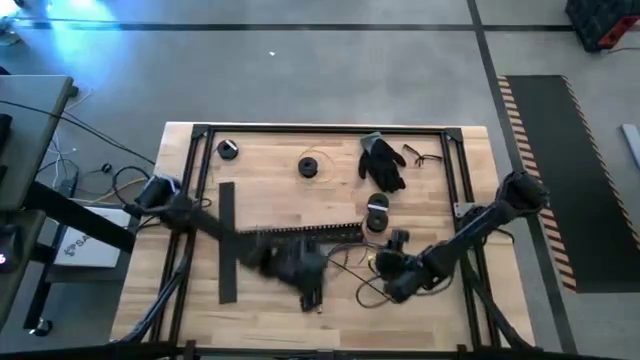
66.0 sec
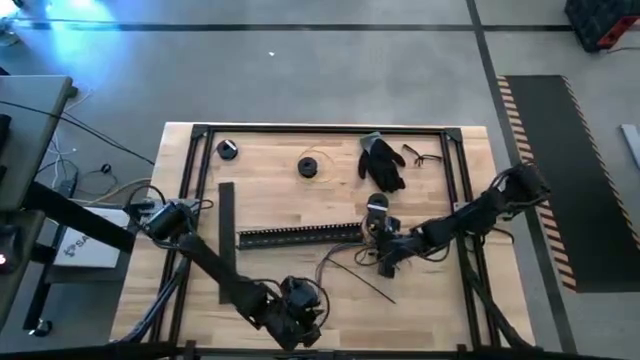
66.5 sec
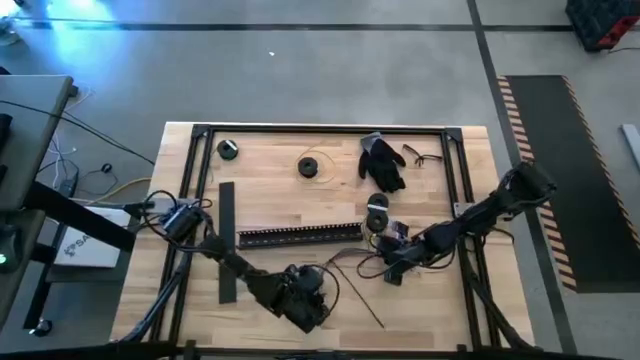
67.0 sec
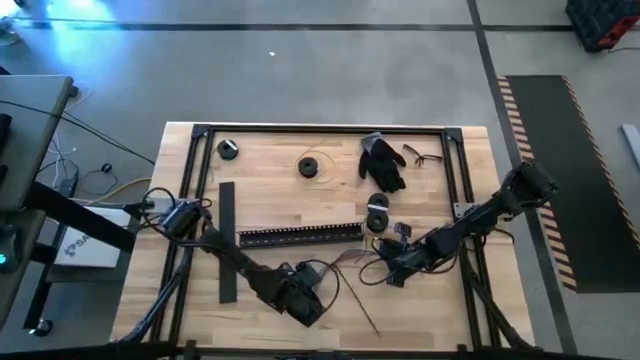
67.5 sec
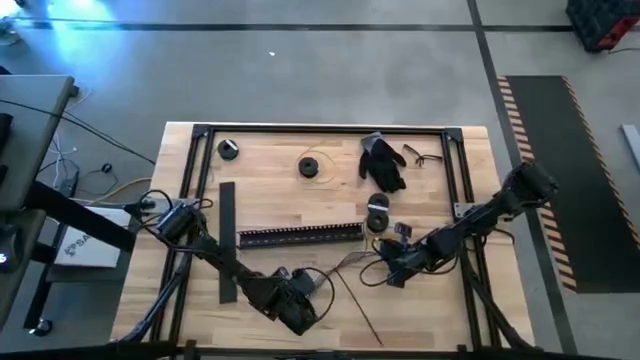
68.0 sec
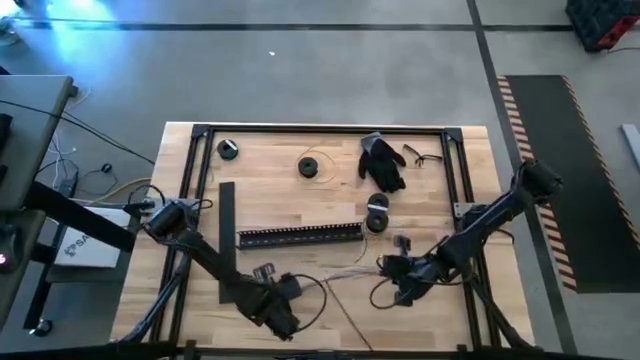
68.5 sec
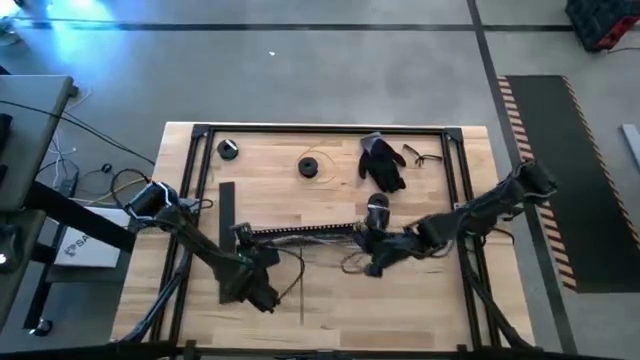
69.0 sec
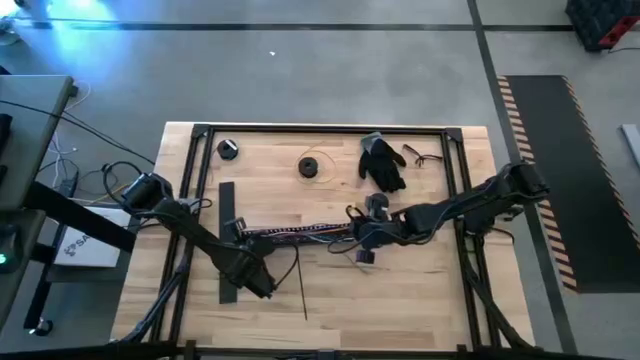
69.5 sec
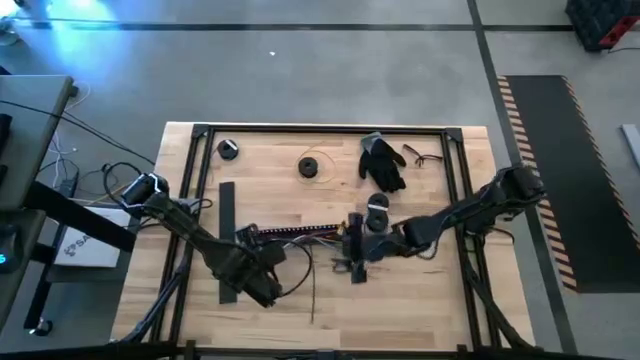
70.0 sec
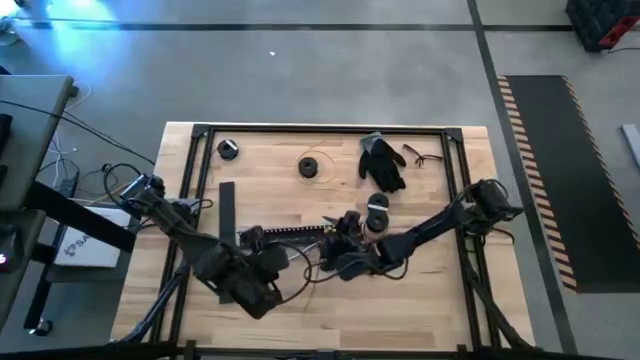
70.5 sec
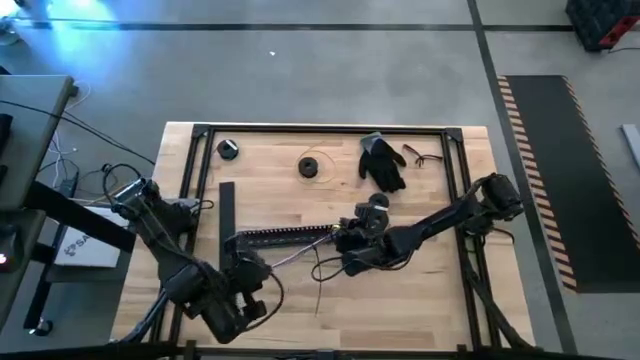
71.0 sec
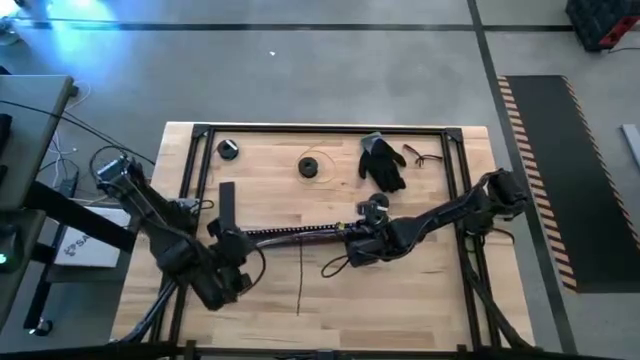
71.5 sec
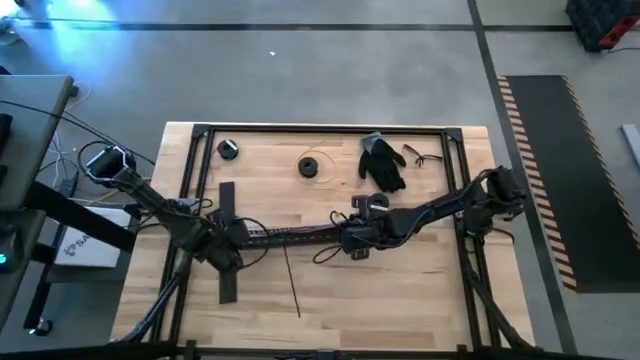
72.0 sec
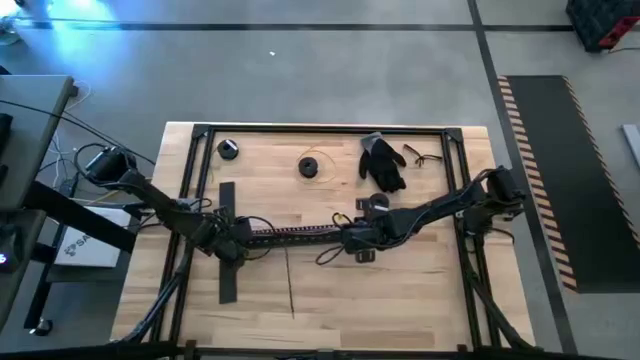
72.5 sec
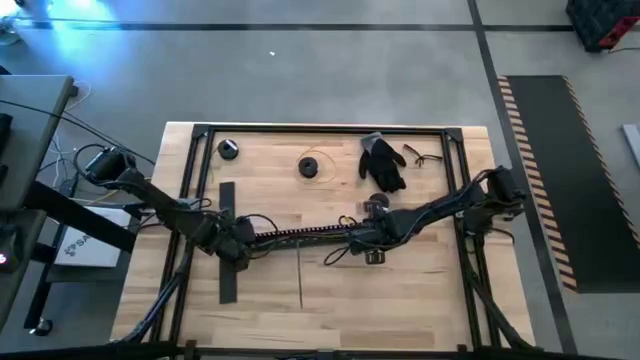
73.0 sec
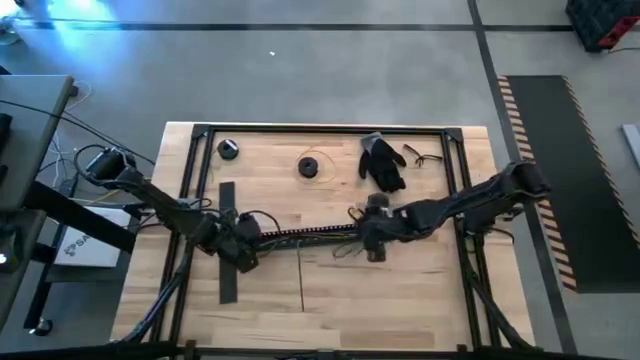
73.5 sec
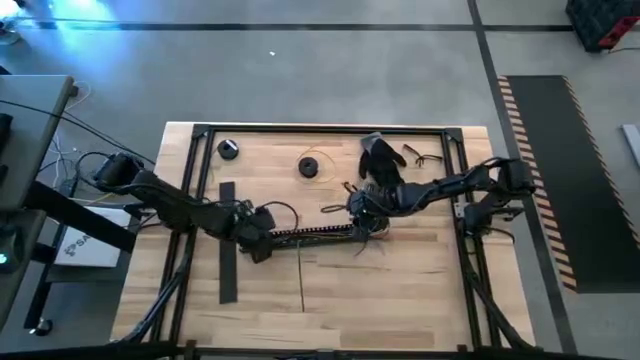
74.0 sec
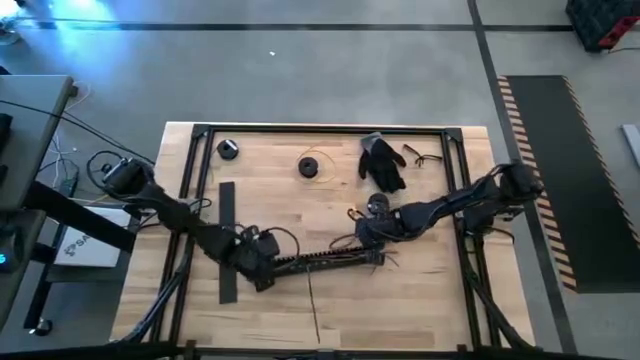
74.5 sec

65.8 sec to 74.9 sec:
Task: Ziptie cables
Put the black zip tie cable into the black cable duct

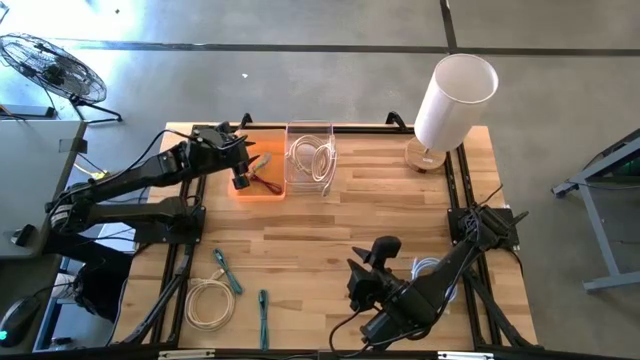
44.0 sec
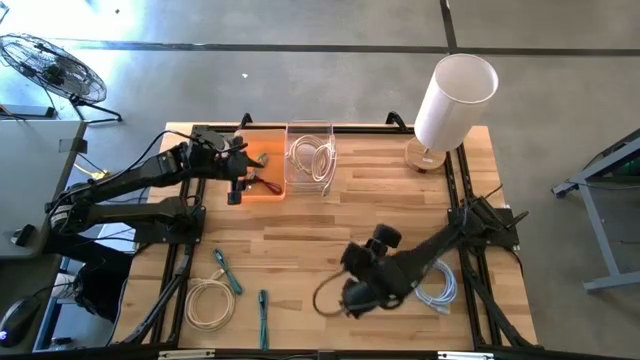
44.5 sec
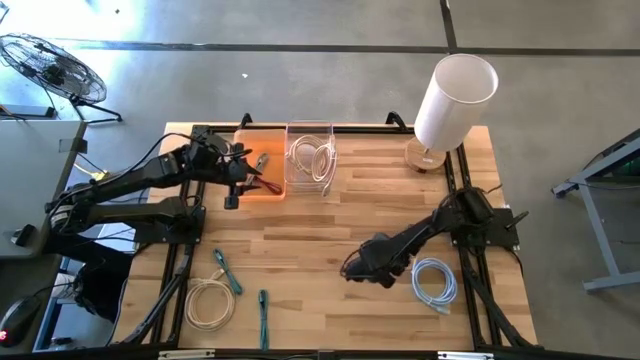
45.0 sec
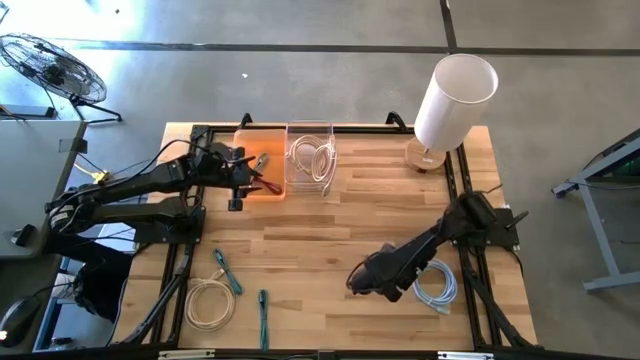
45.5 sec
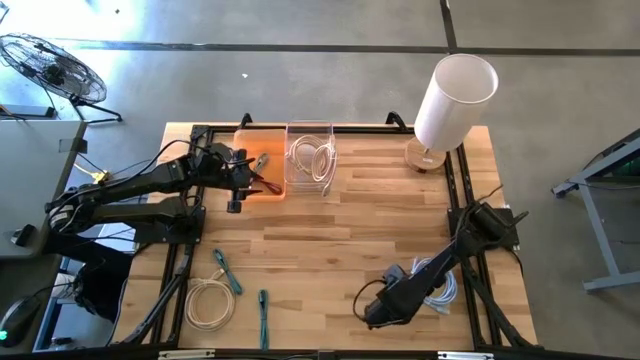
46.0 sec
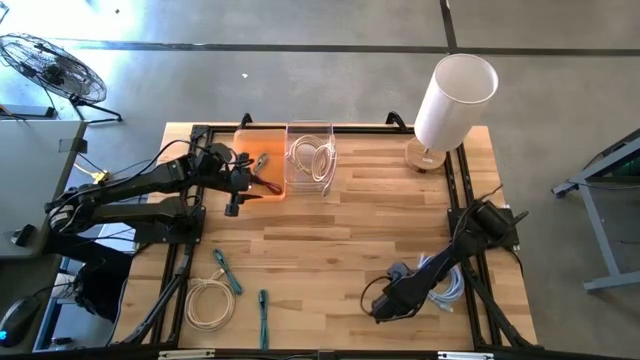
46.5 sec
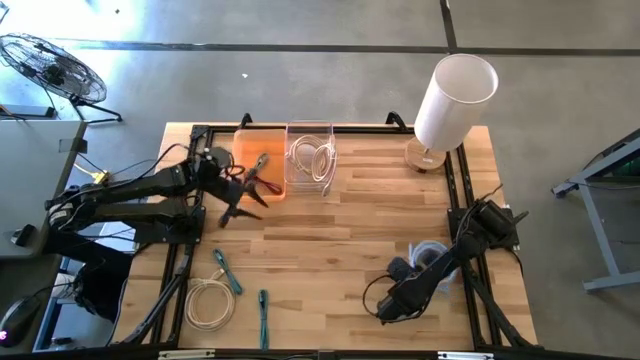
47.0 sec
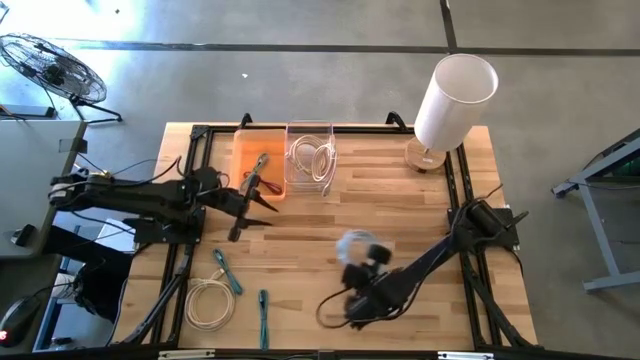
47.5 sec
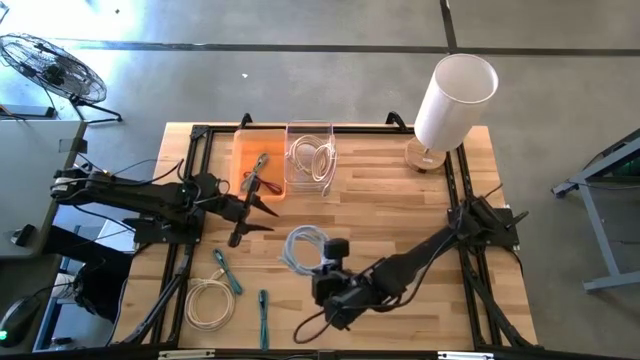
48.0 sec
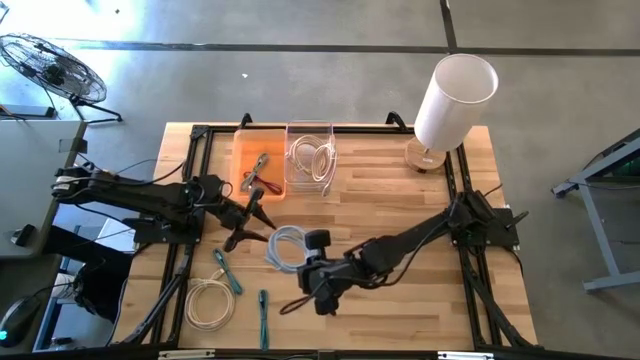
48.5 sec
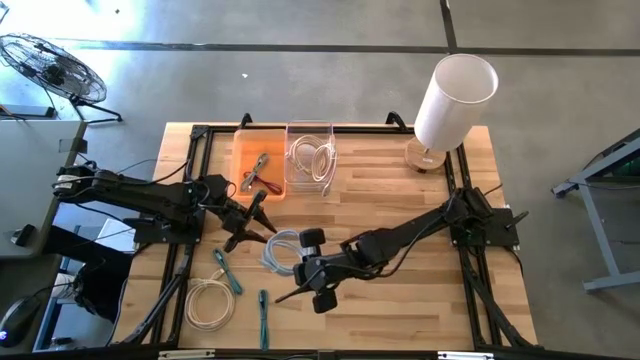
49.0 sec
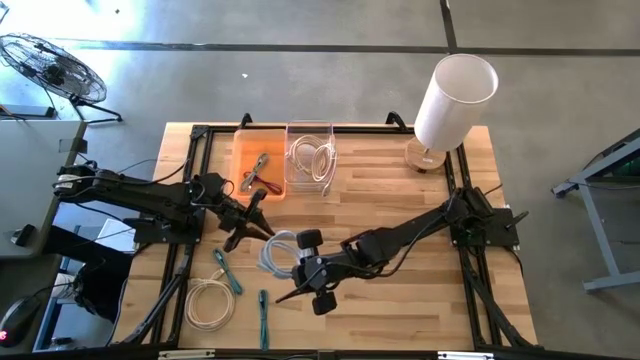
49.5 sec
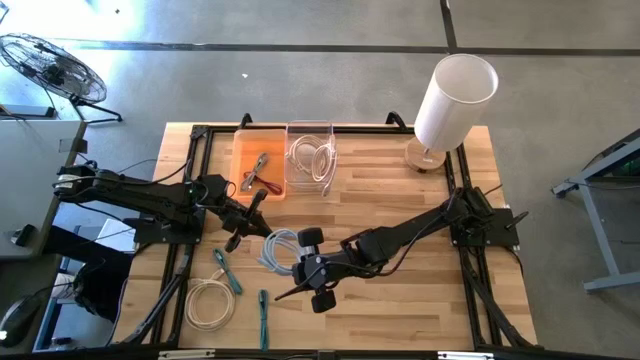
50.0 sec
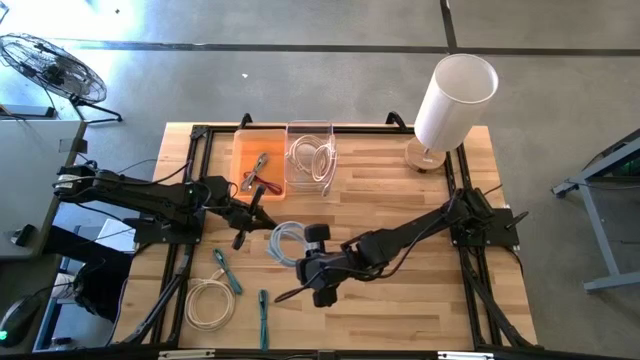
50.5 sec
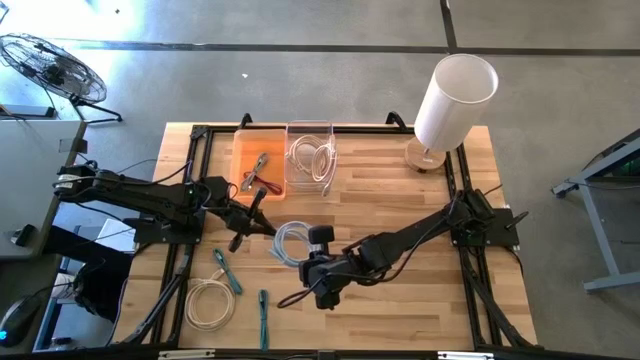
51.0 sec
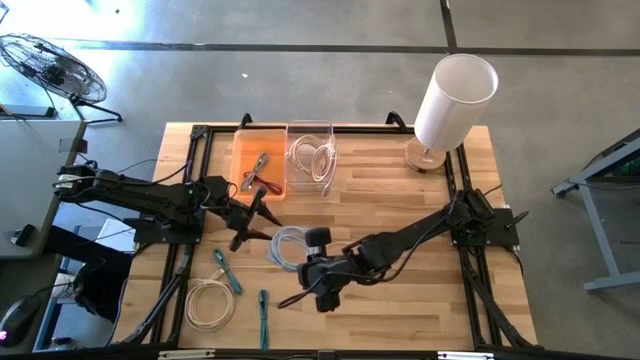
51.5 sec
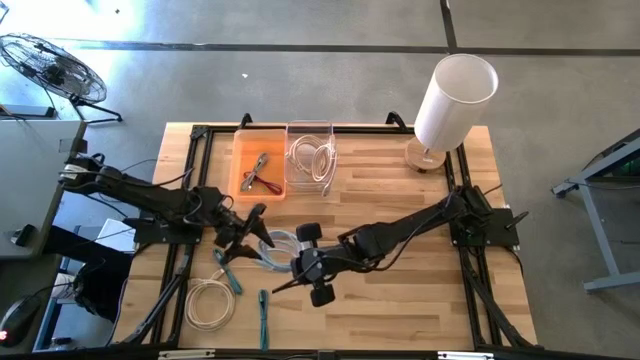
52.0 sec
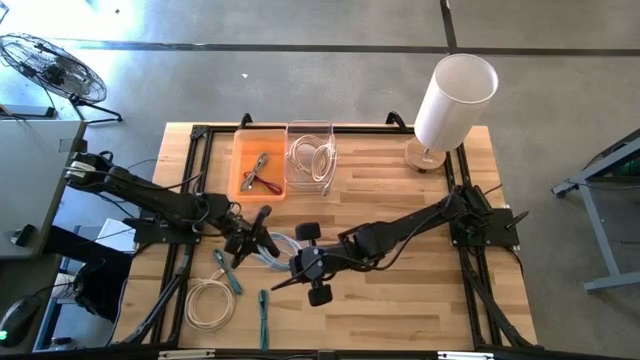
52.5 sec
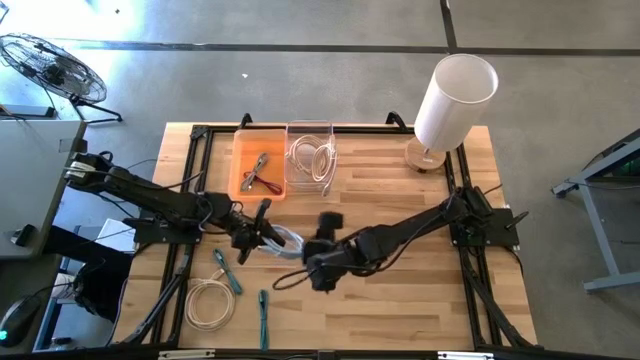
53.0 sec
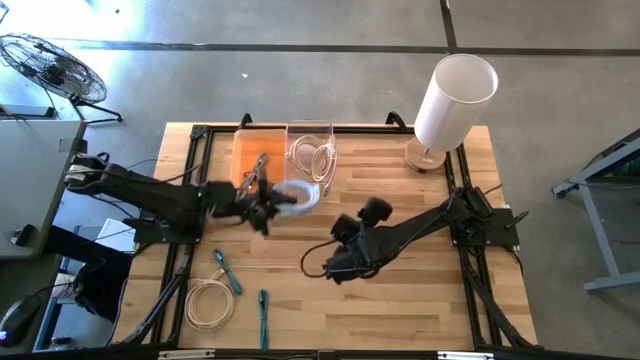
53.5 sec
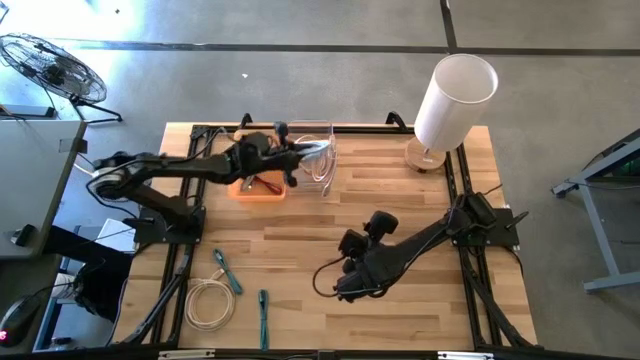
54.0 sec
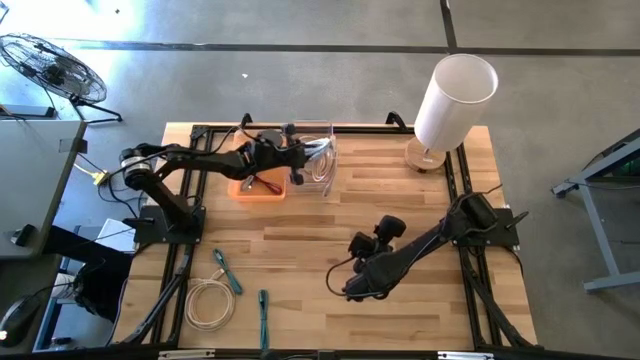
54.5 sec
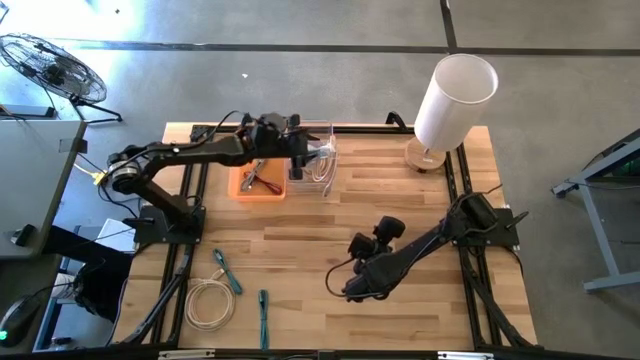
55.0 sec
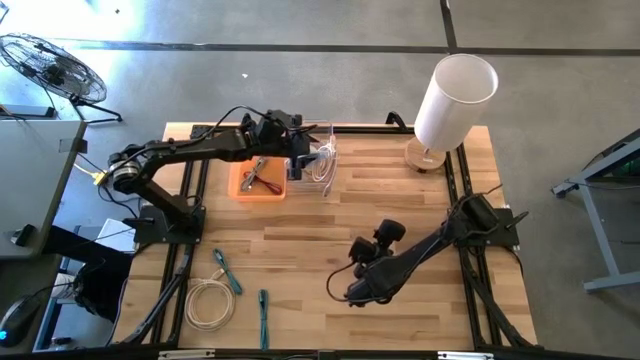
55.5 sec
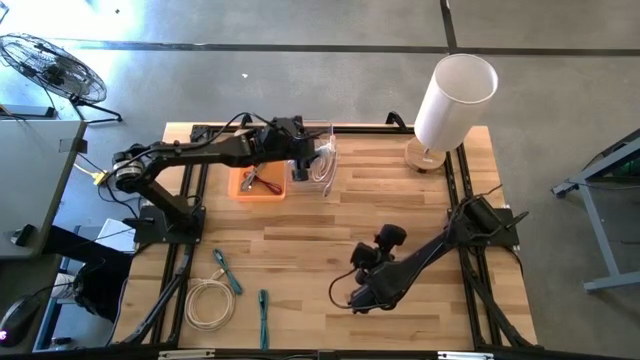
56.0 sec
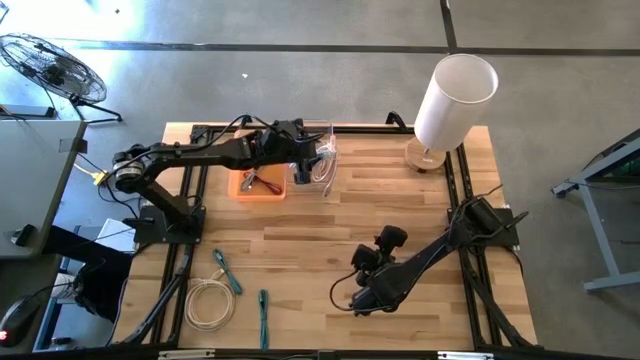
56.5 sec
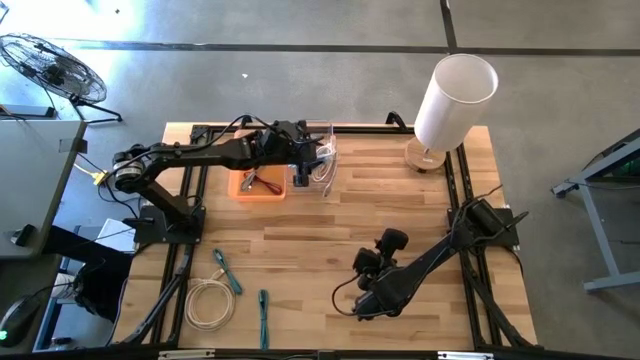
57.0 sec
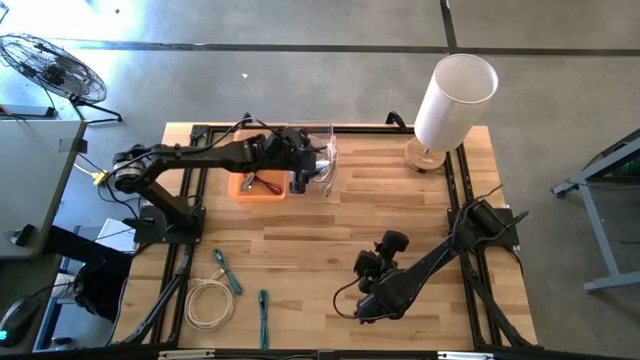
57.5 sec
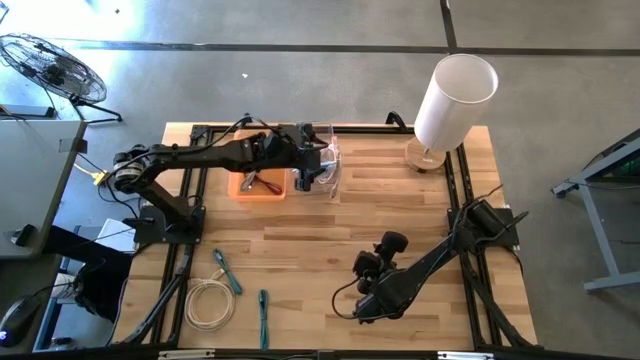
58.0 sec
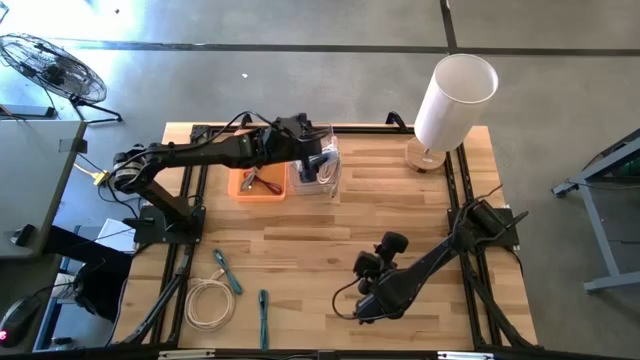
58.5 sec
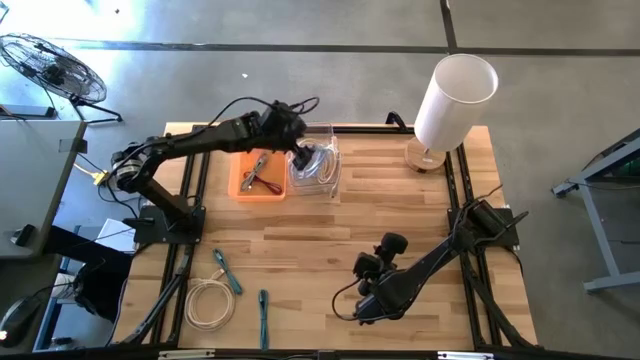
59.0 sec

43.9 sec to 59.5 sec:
Task: Pick & Place USB Port
Put the blue HDMI cable into the transparent bin
